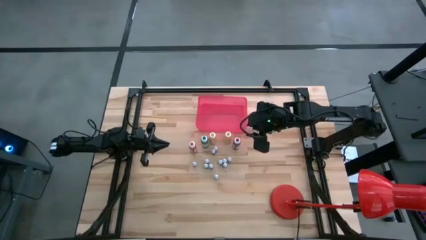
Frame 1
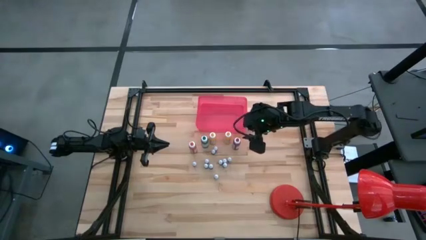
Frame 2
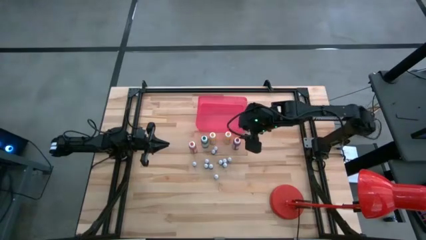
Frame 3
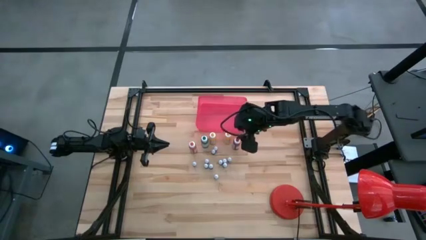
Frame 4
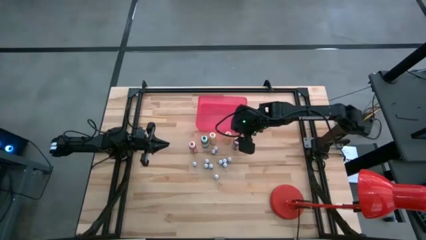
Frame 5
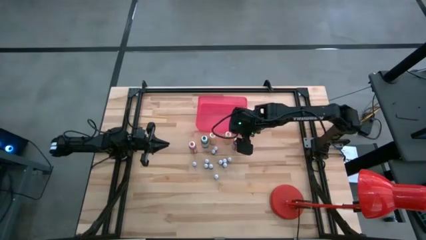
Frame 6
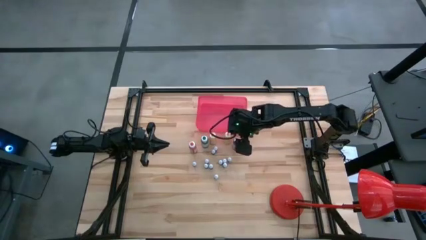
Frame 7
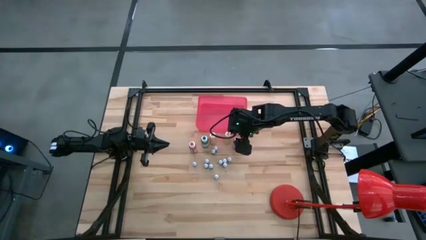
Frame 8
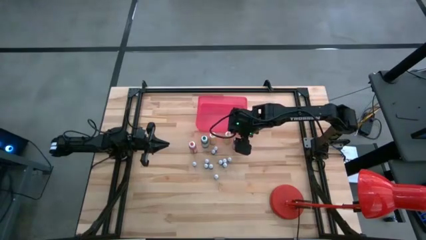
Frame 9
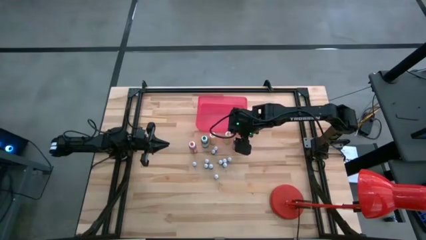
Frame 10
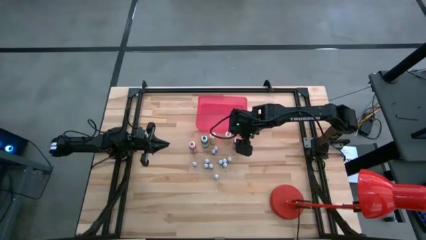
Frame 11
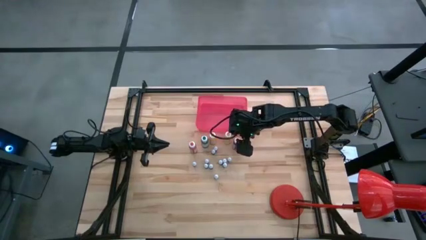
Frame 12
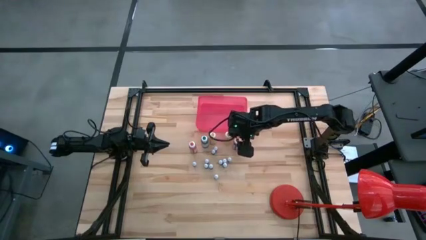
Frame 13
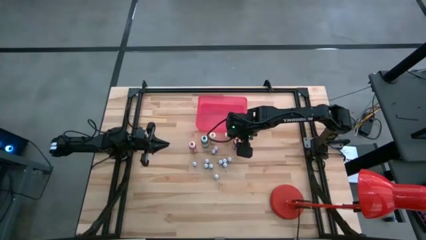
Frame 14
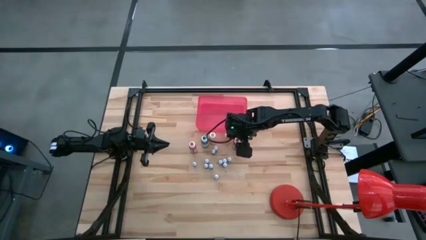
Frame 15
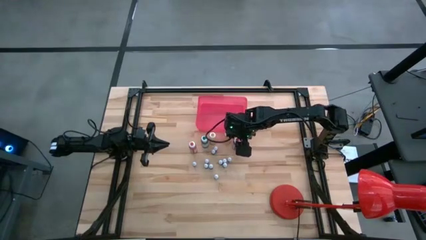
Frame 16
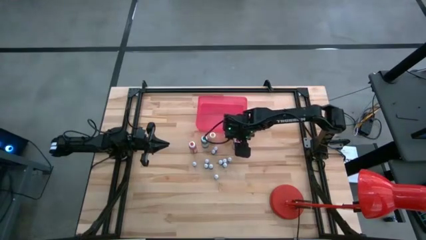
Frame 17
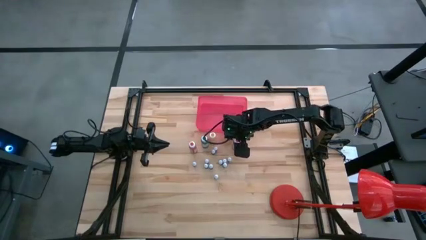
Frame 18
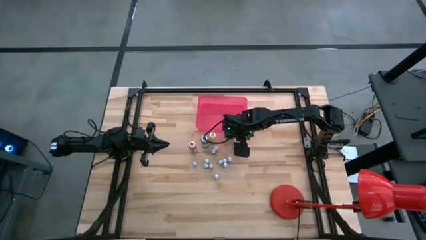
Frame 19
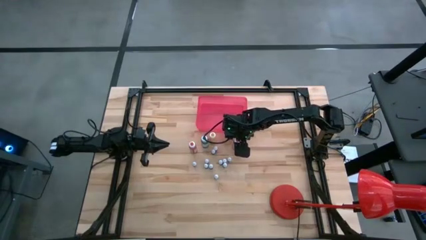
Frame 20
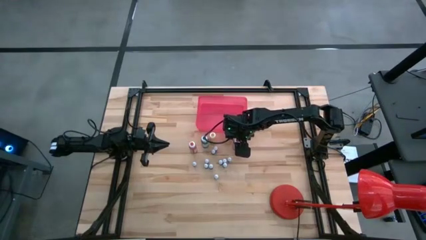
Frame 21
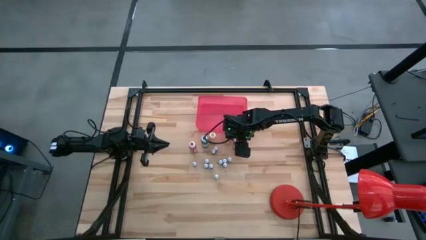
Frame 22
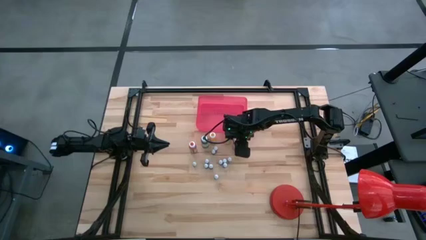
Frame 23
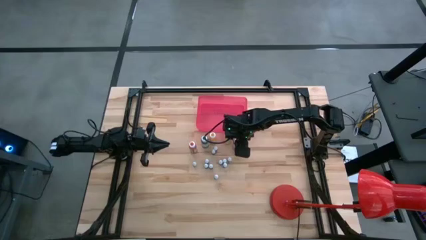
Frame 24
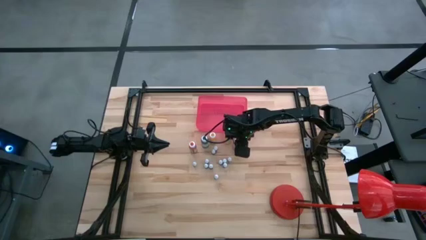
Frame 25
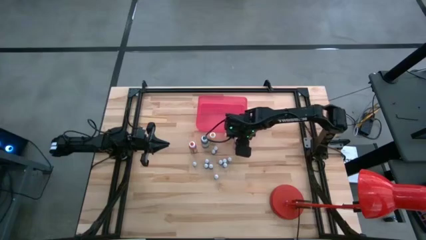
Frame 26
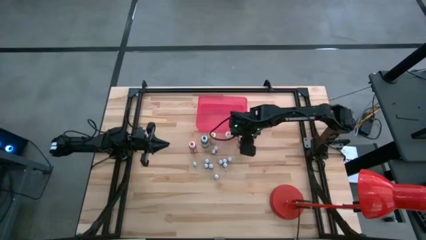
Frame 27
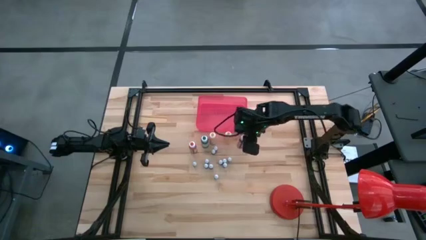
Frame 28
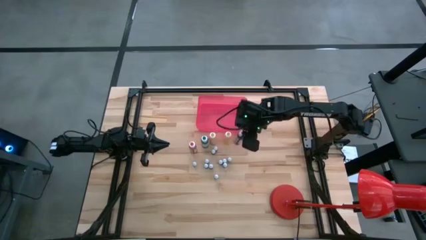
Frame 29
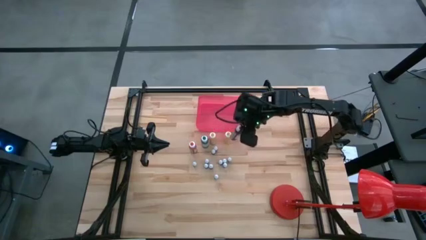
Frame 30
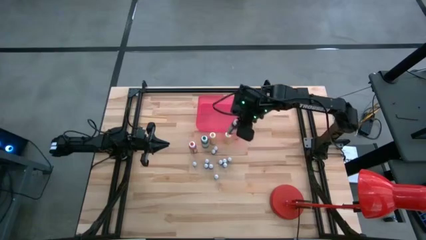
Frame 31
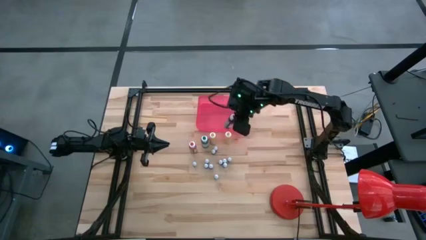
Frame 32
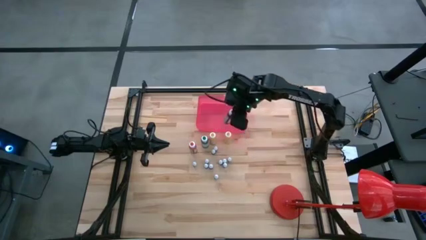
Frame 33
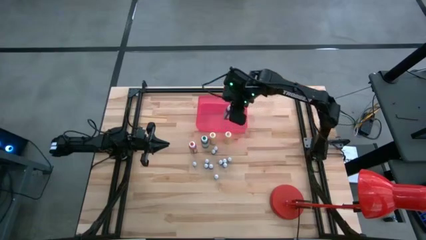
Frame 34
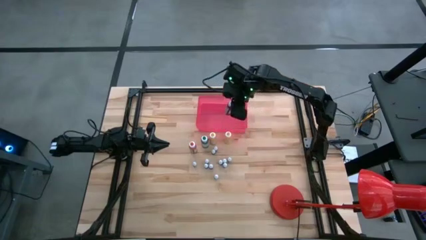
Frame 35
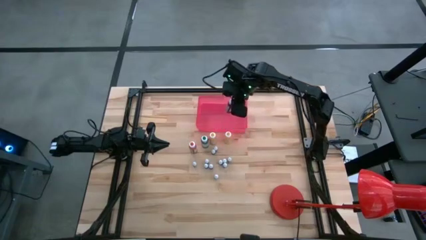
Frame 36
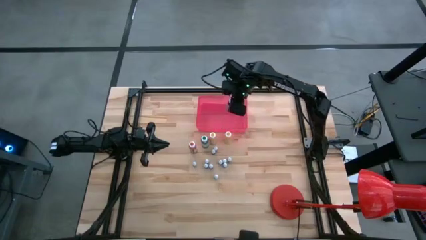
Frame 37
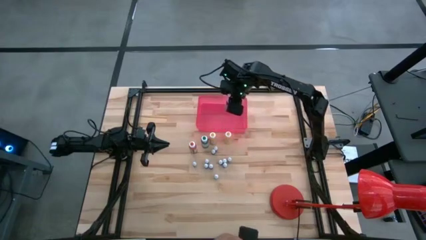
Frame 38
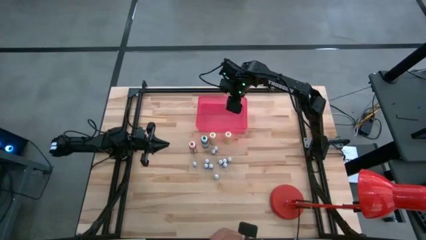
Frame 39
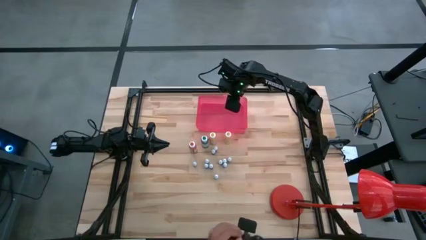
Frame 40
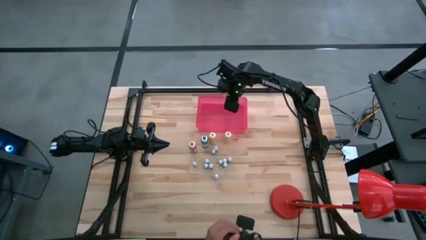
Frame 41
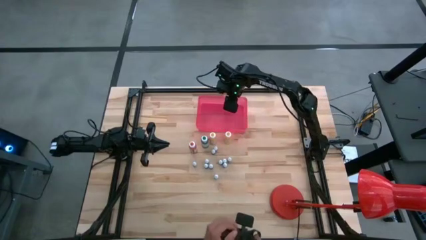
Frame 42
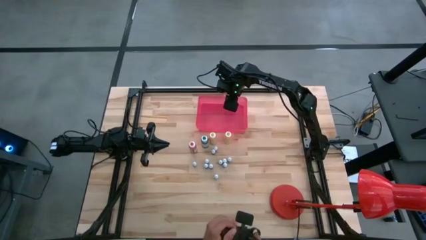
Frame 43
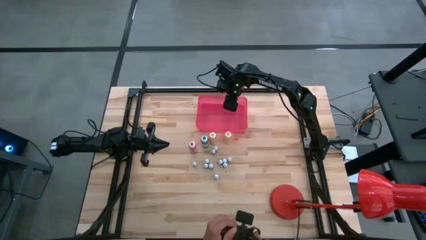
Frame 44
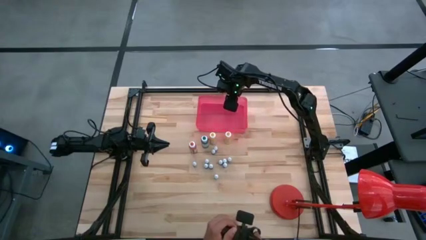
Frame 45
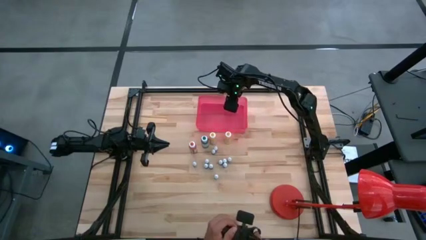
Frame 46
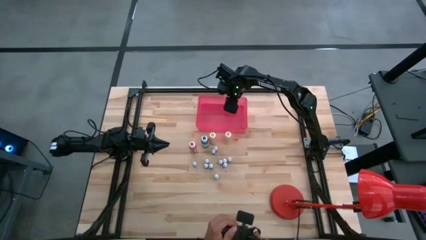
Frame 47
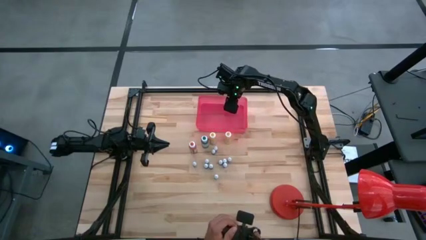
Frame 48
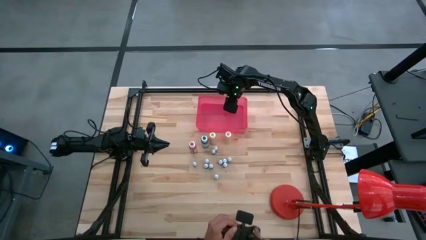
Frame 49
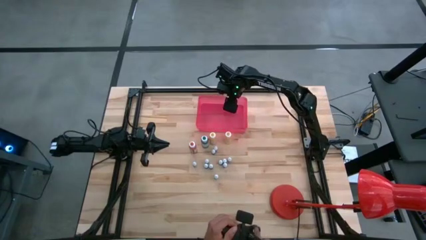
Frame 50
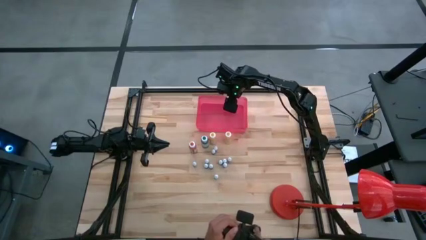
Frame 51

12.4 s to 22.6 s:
Task: Pick & Place food coloring
Put the large red food coloring bottle into the pink bin

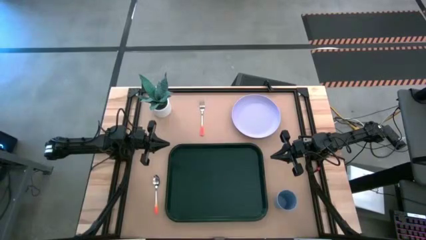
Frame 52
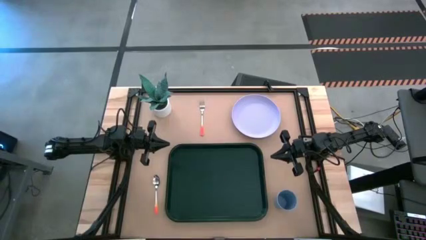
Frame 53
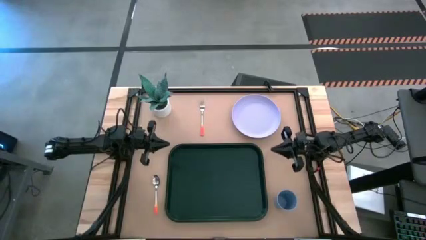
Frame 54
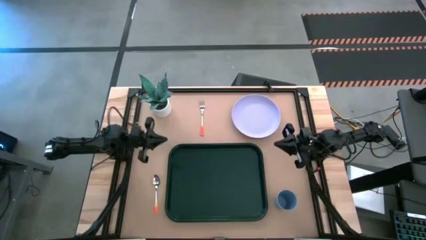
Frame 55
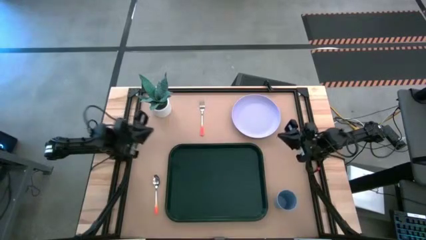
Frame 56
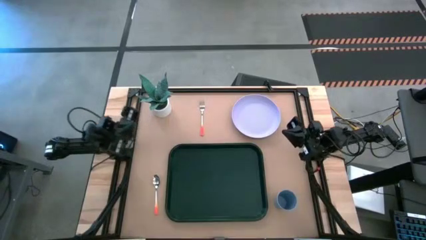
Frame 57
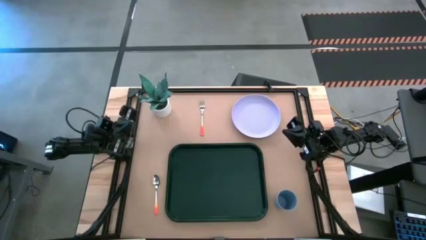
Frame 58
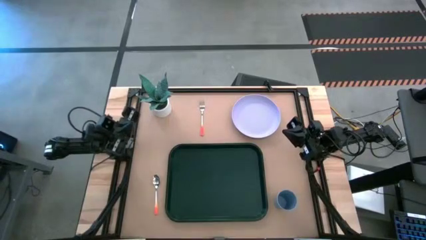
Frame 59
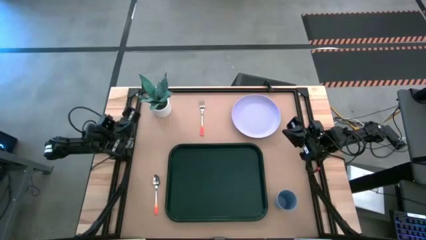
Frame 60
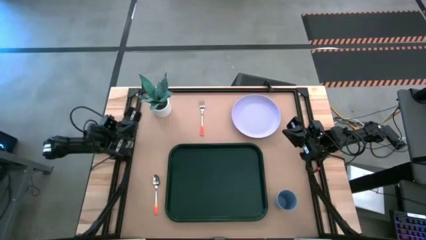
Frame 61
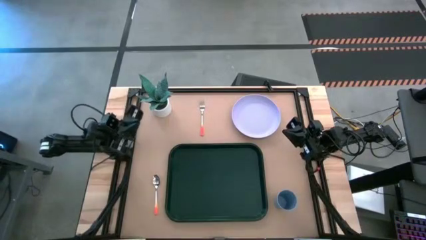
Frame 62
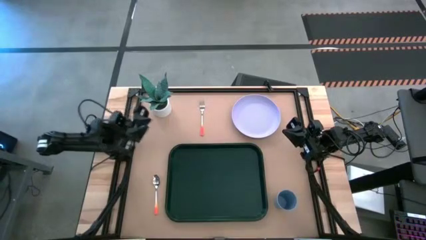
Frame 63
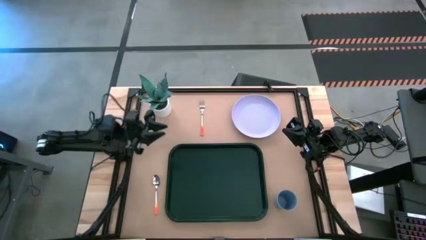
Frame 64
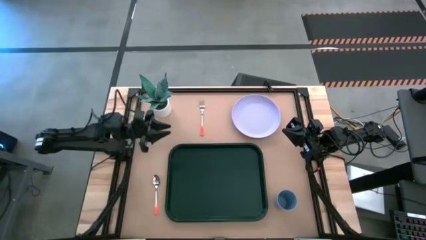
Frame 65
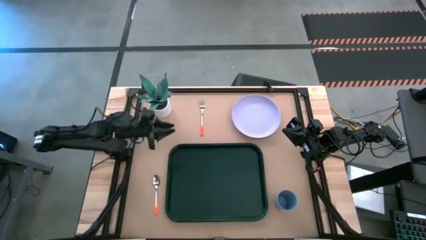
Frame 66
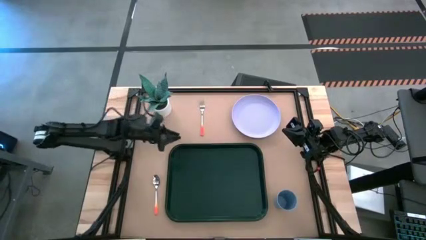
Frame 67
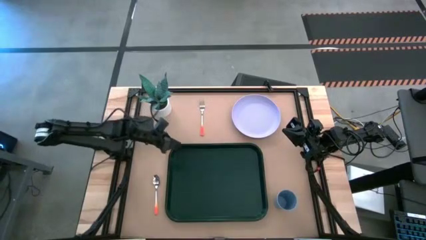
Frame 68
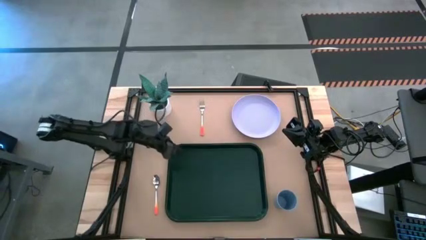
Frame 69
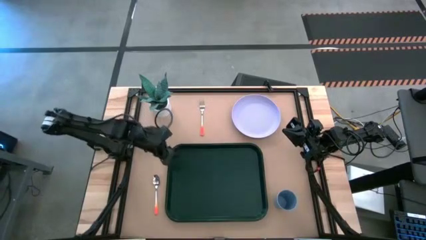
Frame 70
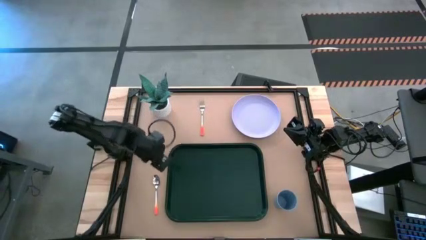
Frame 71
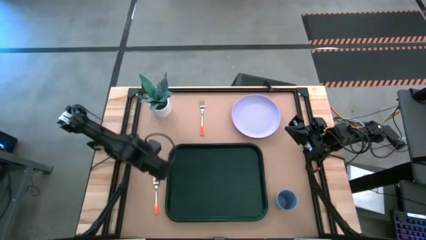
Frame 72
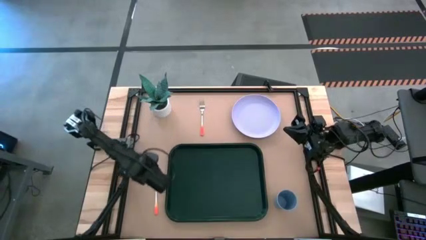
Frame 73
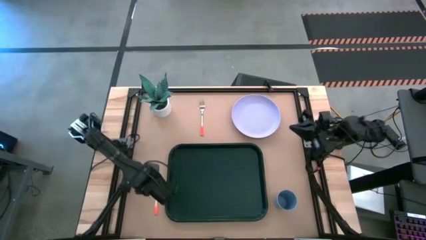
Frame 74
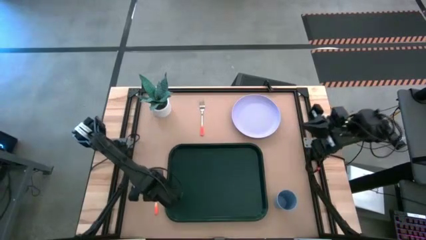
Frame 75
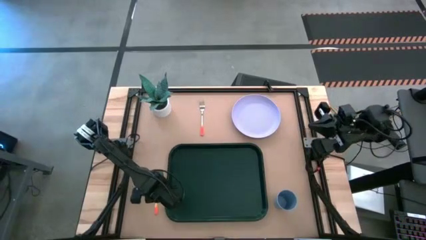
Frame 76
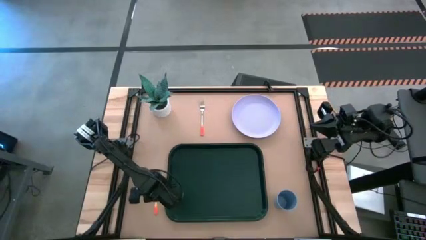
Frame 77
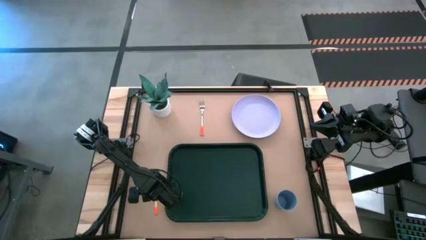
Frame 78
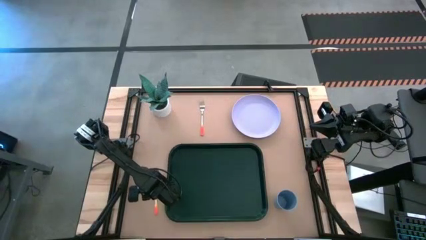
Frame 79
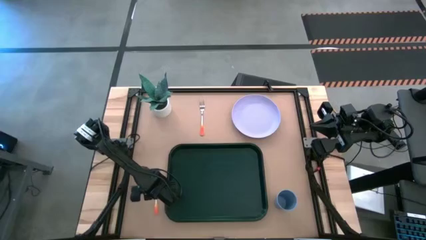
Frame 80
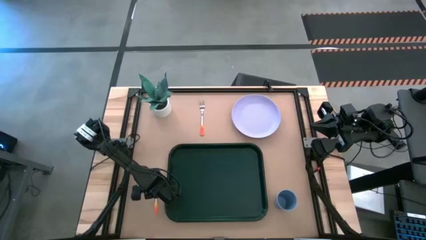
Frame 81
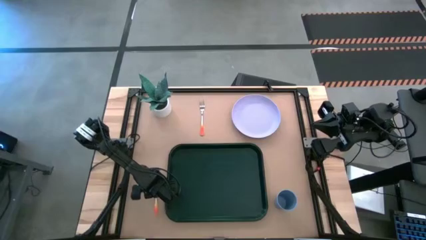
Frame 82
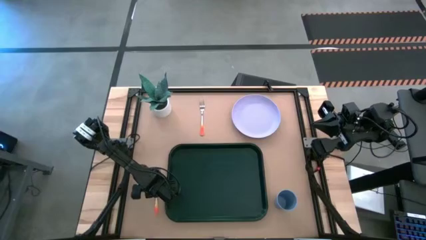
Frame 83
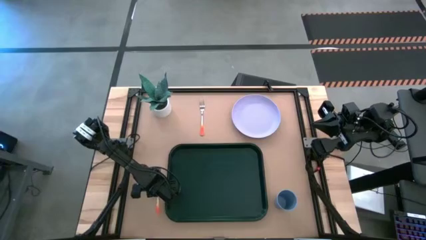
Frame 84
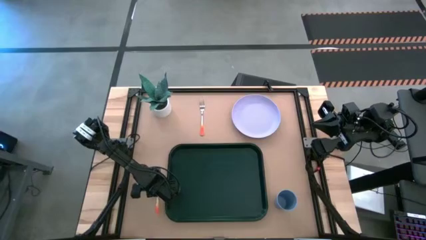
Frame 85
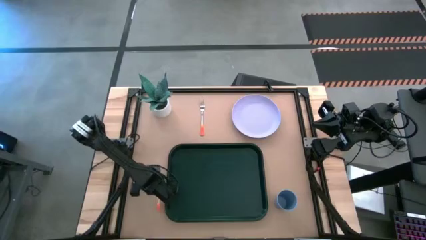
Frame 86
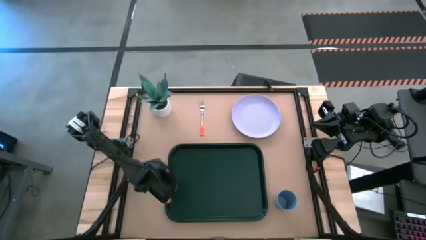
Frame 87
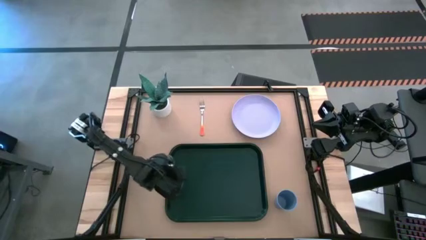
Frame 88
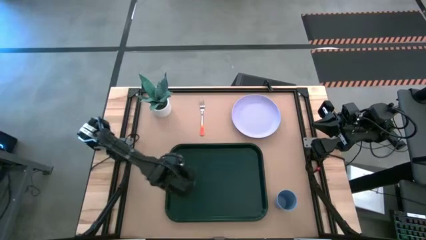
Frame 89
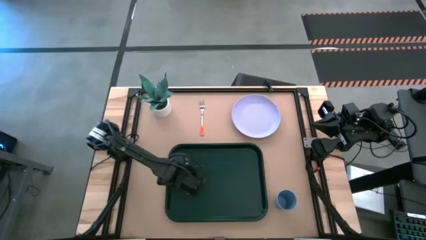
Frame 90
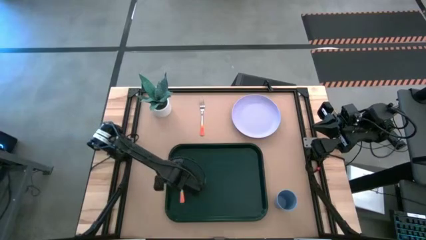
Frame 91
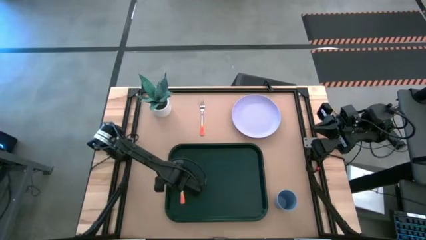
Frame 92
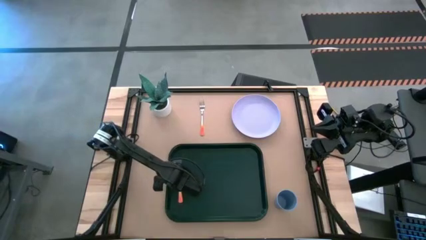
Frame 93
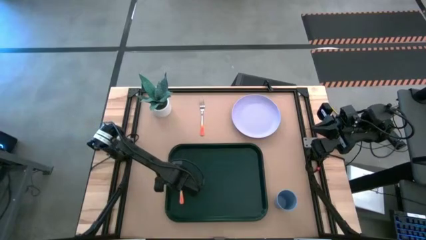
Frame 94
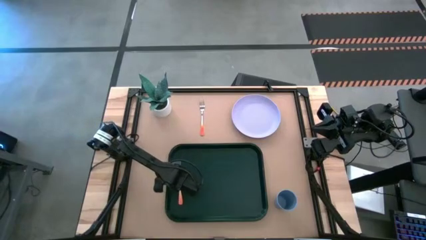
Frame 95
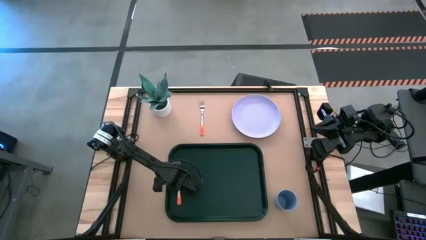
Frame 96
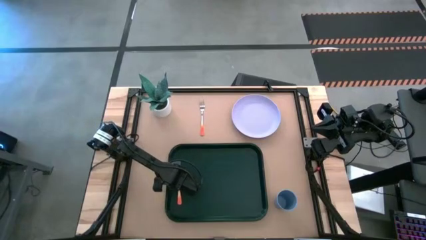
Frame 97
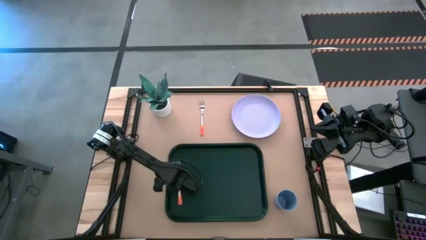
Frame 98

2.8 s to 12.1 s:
Task: Pick and place plate/cup/fork/spoon on tray
Put the orange spoon on the left of the dark green tray
